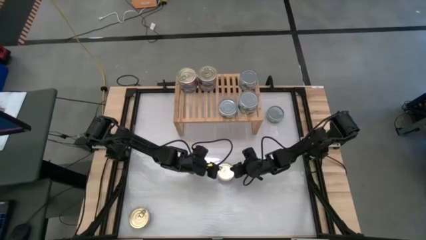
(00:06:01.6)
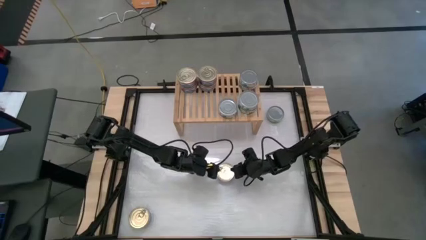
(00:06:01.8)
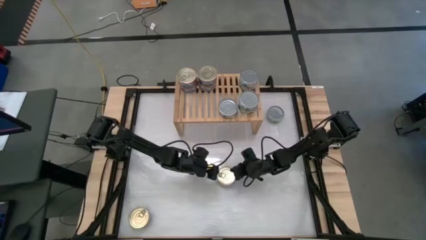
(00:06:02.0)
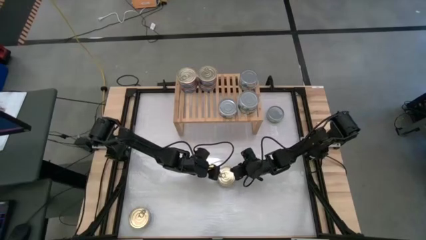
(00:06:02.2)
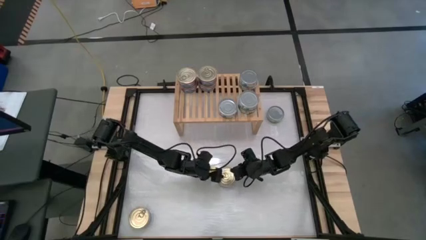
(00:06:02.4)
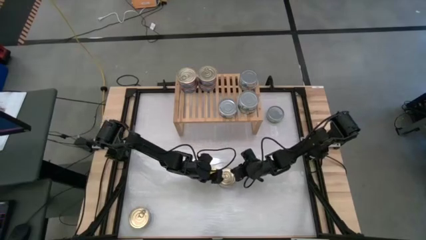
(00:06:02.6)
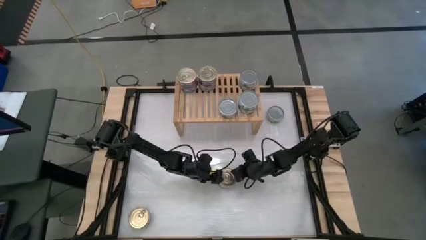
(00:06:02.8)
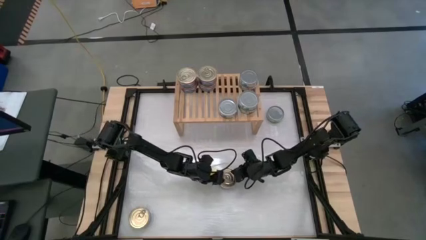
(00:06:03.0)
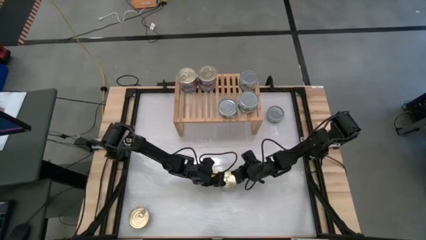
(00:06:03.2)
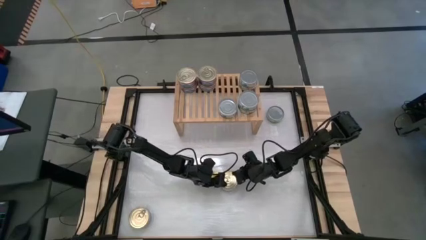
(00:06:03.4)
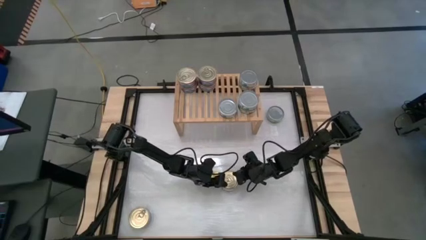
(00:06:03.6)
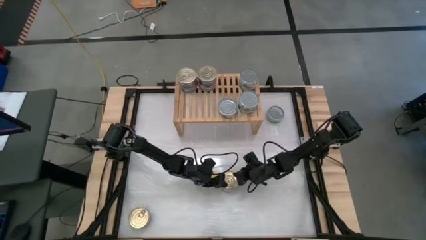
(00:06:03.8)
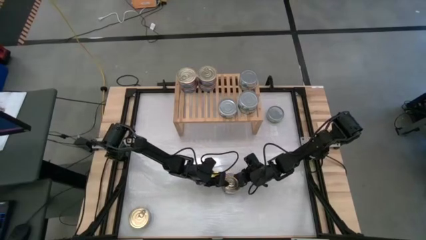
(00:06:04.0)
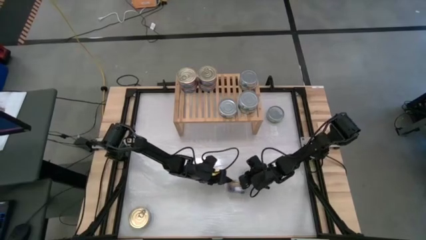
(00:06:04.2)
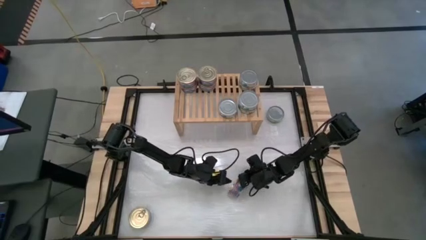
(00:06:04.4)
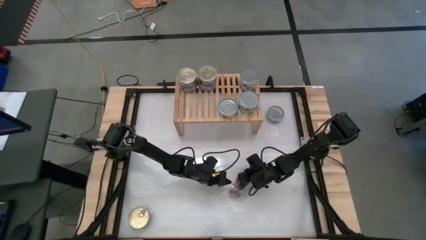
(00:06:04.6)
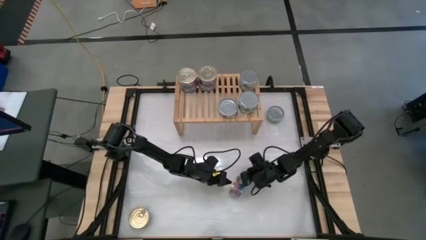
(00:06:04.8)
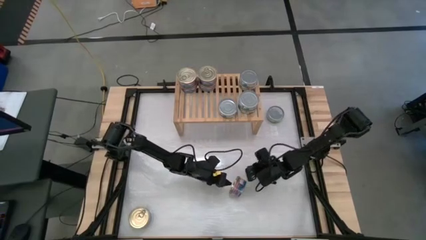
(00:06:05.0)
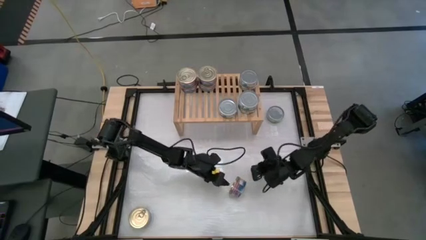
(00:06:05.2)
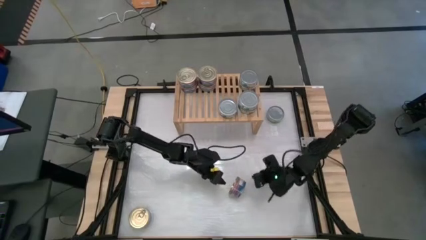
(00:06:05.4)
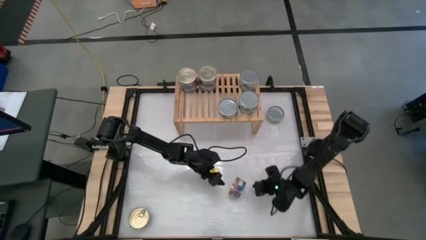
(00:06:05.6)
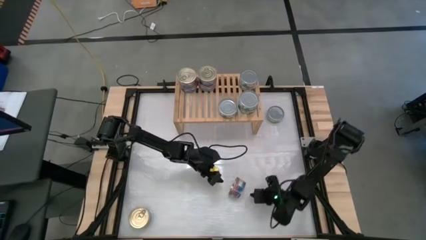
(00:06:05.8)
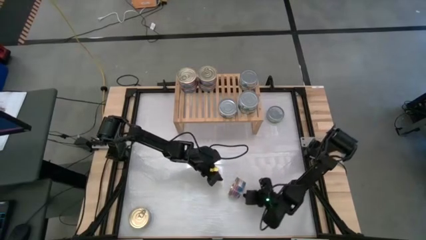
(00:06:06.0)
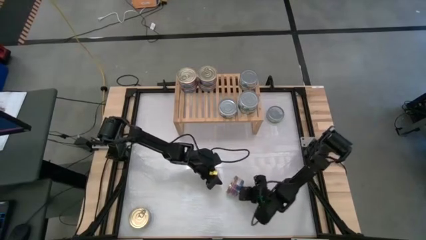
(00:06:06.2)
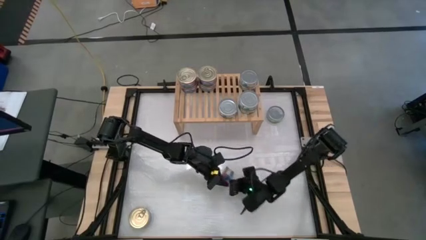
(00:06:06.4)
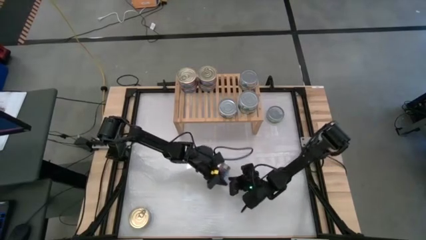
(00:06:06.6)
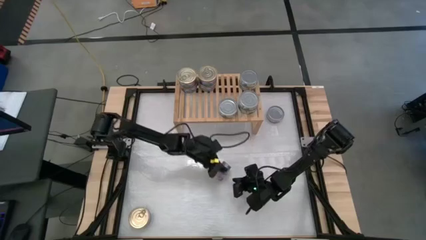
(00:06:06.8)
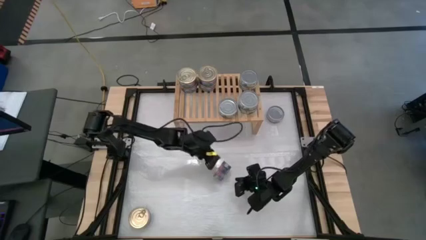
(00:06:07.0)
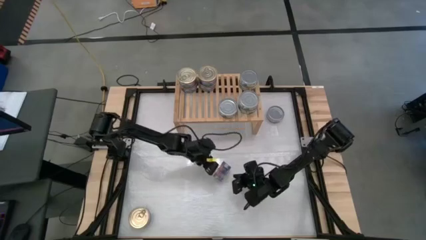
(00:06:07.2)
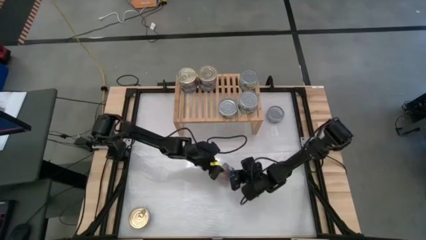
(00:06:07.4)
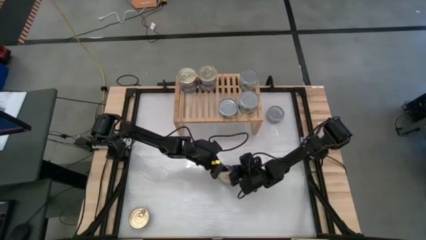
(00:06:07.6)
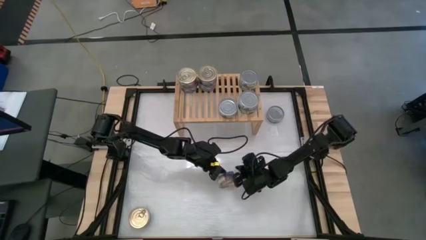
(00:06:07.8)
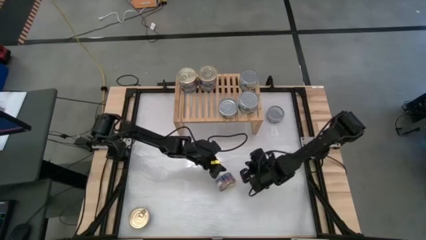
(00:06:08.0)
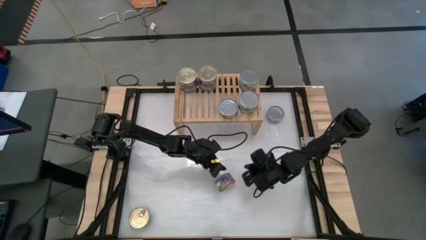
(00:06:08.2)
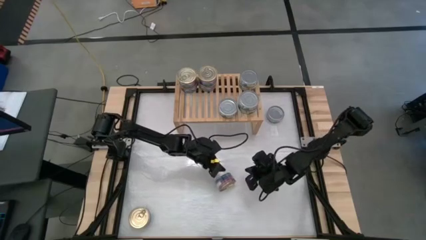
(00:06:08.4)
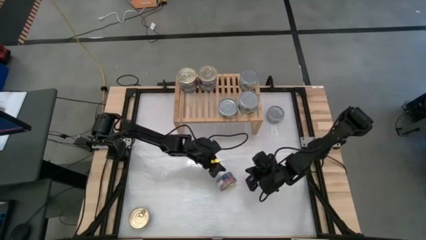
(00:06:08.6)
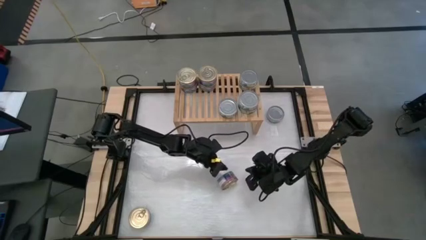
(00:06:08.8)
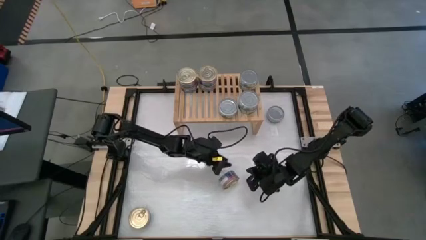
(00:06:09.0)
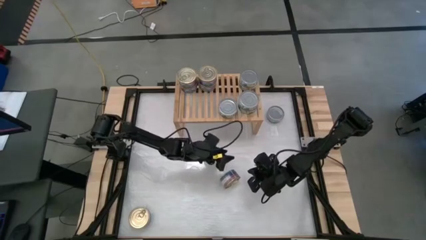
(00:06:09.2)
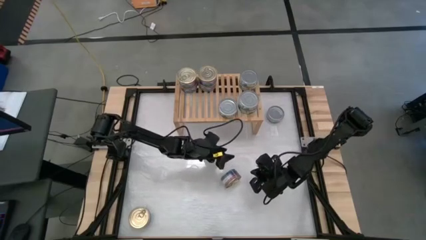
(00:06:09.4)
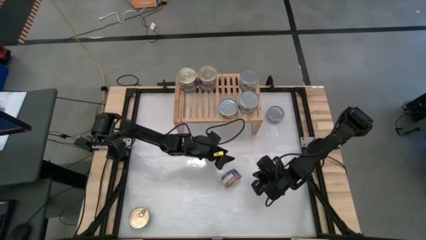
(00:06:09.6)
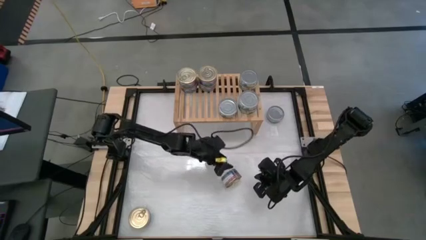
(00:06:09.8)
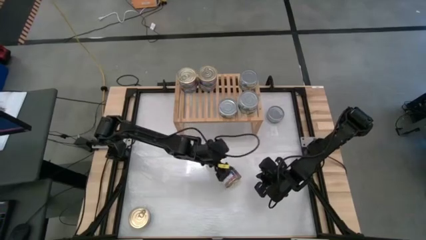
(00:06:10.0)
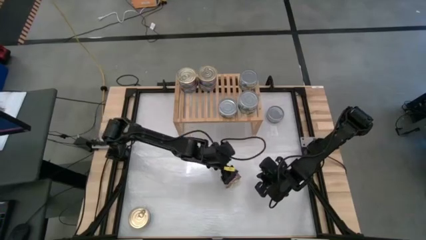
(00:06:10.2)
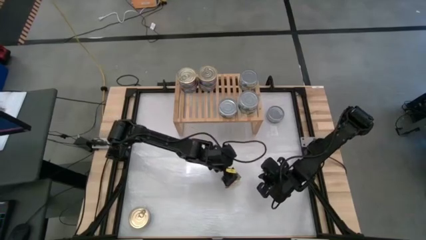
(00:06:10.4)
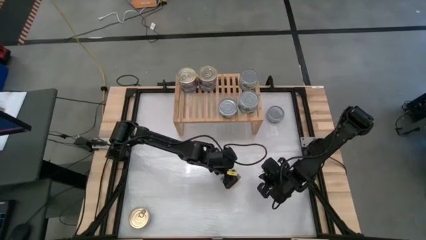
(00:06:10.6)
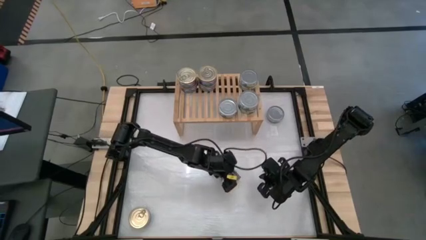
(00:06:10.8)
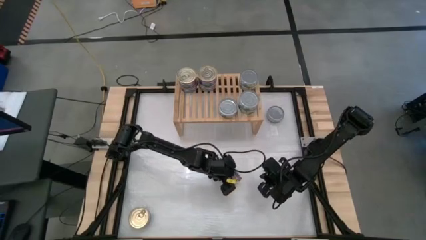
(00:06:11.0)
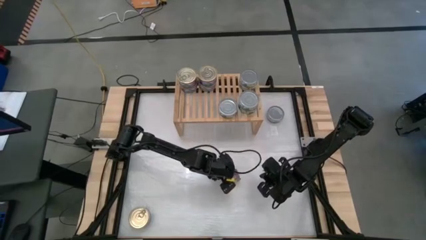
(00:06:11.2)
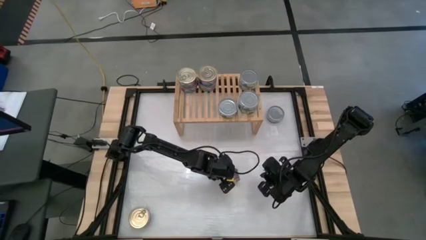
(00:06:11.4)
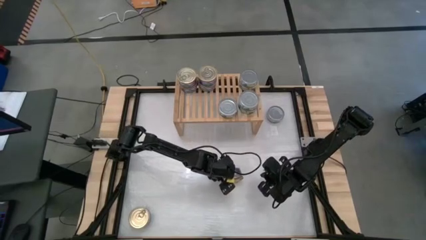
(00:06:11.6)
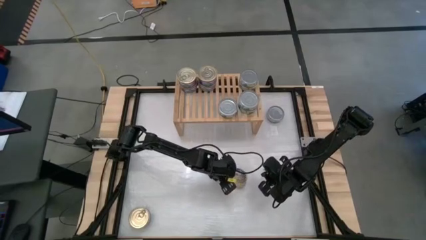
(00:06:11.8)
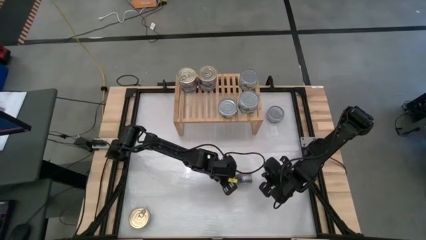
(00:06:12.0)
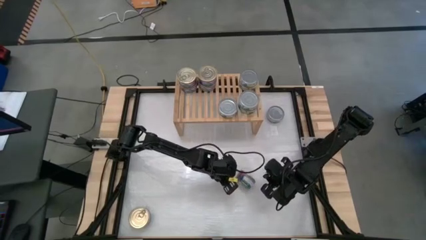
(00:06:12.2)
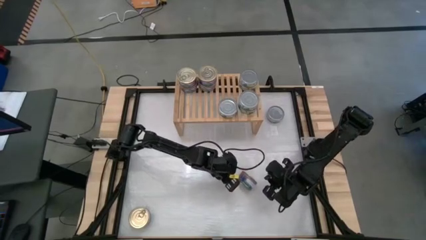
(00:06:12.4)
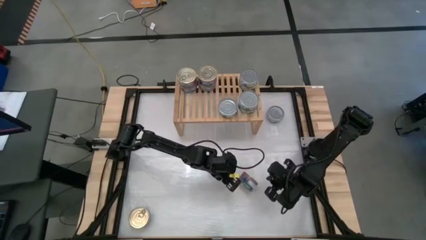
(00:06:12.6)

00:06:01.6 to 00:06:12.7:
Task: Stack canned seafood by type on shelf
Put the blue-pink tuna can on the shelf aligned with the other blue-pink tuna cans

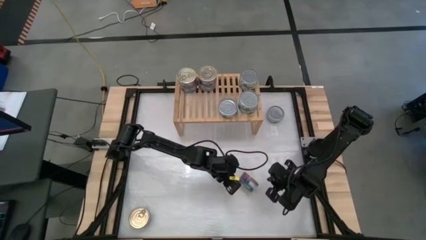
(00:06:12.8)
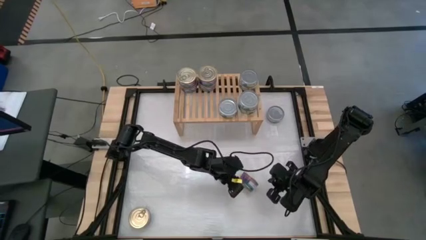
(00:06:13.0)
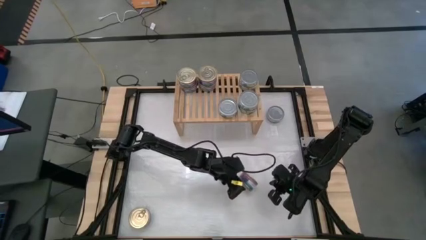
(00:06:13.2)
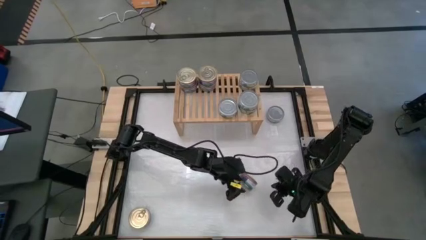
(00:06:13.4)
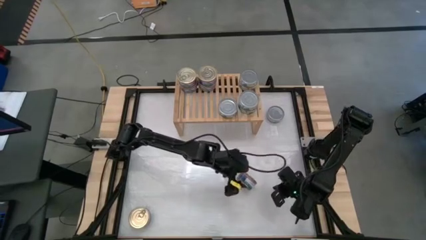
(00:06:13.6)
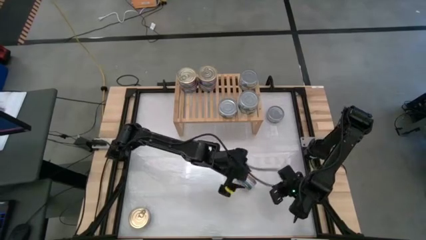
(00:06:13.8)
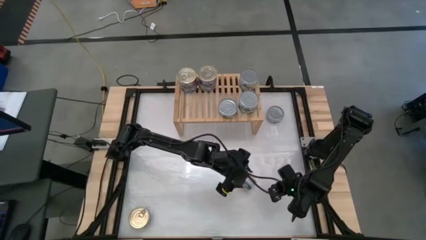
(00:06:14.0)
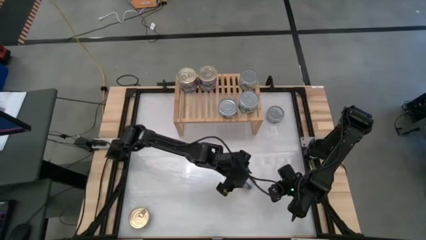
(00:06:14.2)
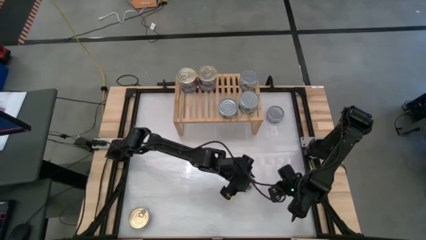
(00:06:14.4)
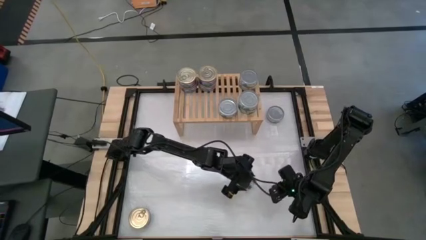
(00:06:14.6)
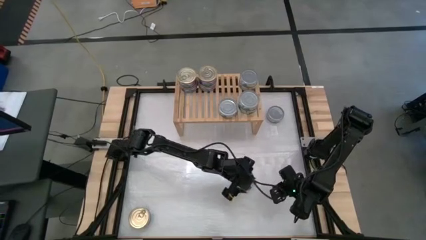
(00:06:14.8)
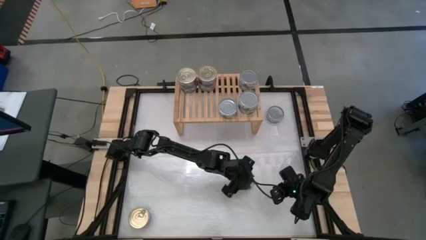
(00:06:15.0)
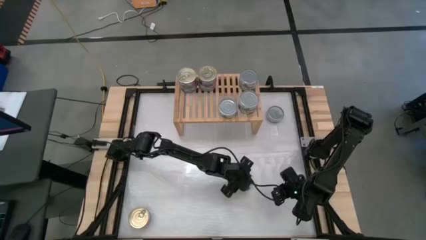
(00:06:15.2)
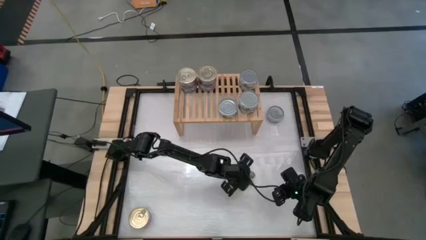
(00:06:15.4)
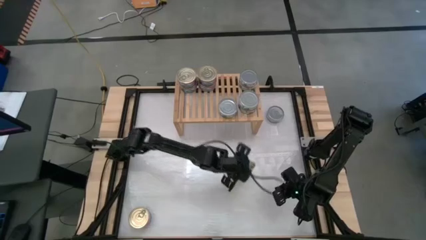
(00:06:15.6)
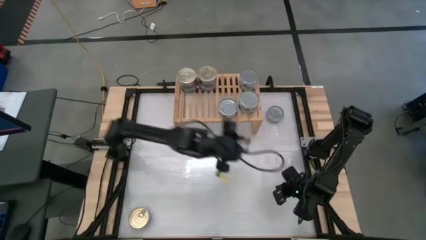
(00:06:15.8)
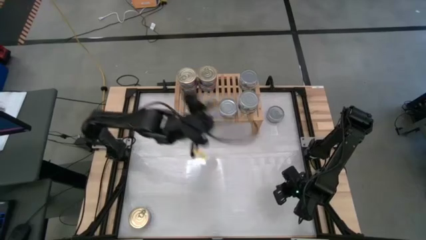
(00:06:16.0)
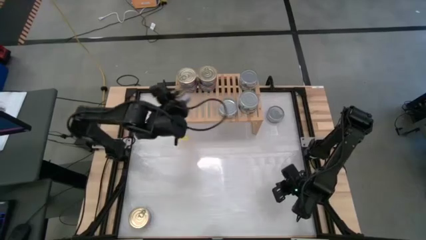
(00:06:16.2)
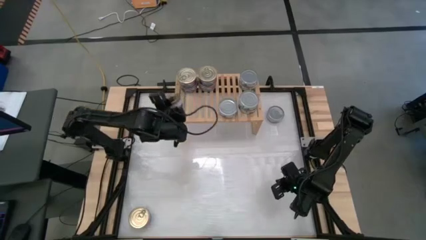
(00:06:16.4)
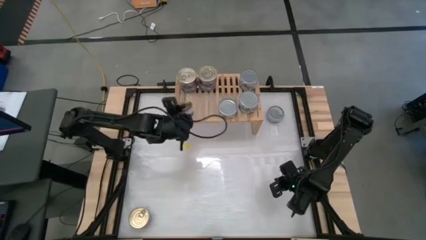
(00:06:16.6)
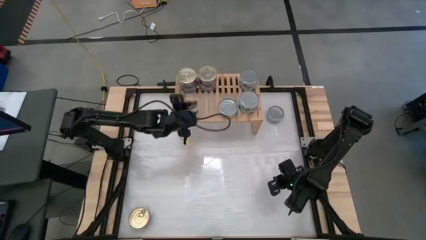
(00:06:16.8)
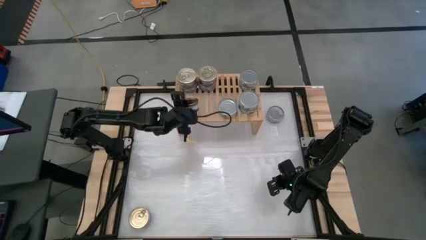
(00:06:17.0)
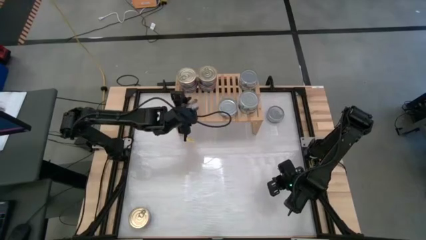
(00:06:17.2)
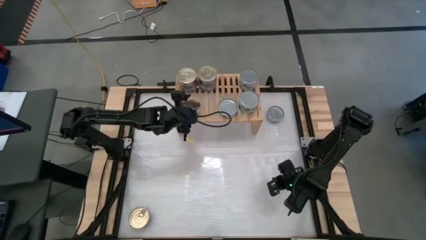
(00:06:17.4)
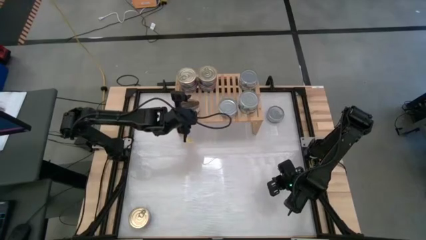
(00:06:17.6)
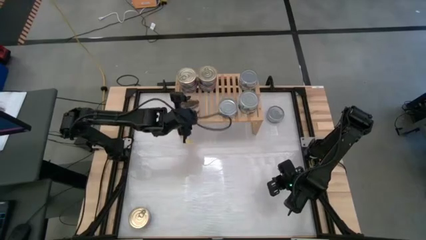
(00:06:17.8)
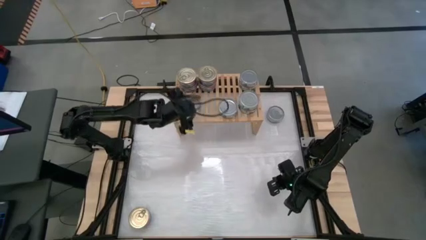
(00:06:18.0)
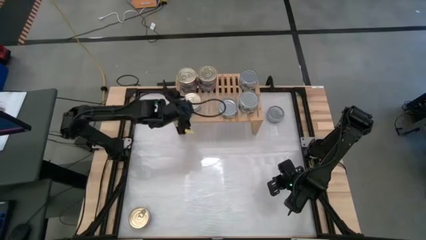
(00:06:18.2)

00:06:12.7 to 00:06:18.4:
Put the blue-pink tuna can on the shelf aligned with the other blue-pink tuna cans
